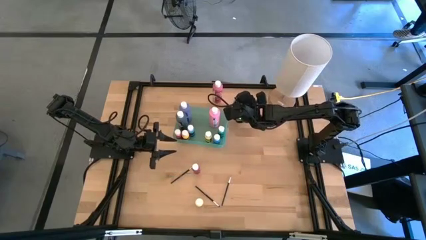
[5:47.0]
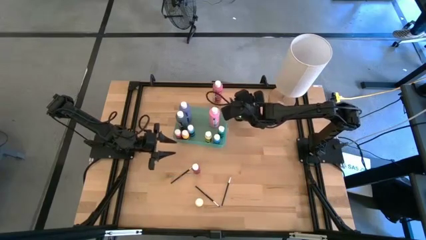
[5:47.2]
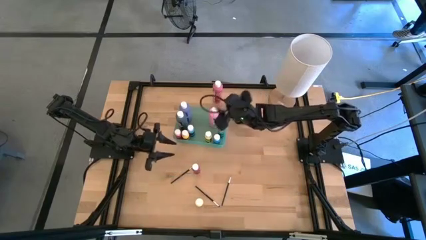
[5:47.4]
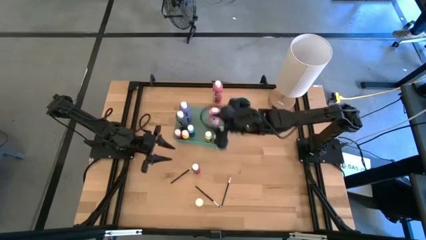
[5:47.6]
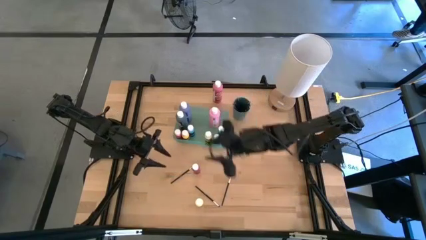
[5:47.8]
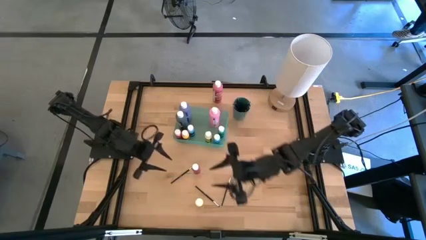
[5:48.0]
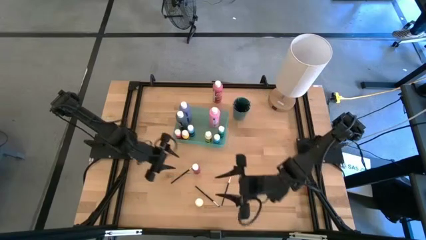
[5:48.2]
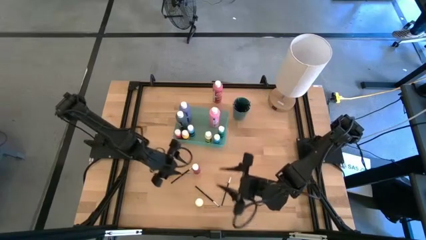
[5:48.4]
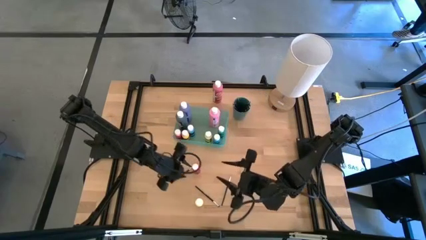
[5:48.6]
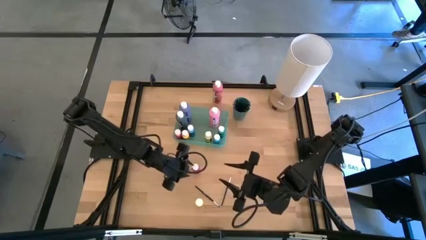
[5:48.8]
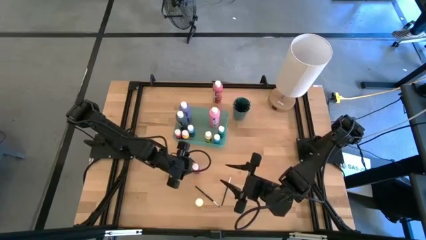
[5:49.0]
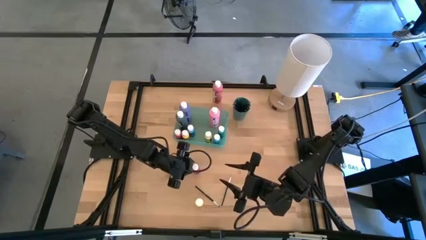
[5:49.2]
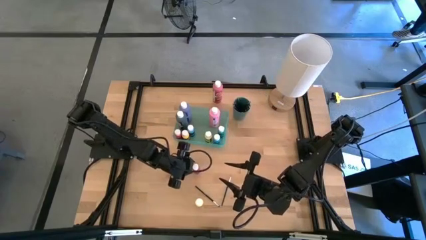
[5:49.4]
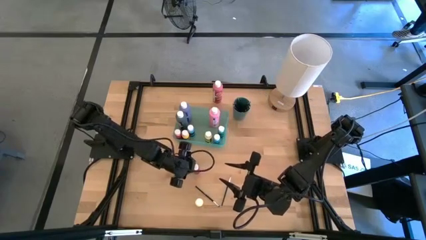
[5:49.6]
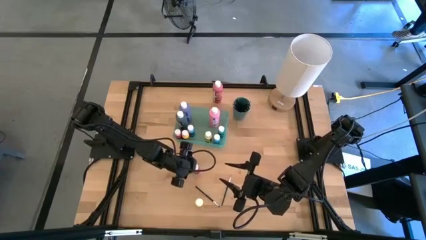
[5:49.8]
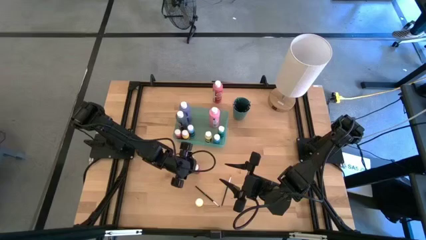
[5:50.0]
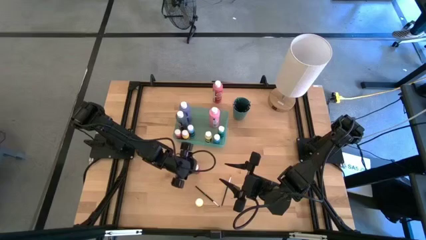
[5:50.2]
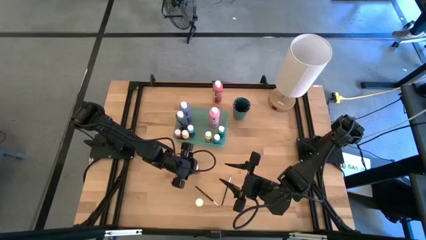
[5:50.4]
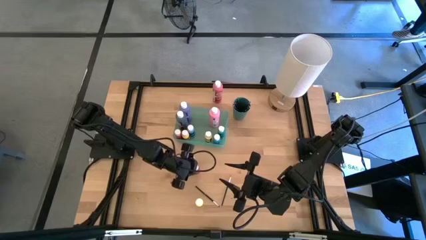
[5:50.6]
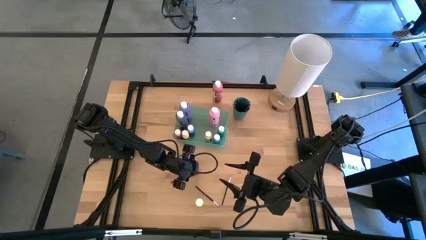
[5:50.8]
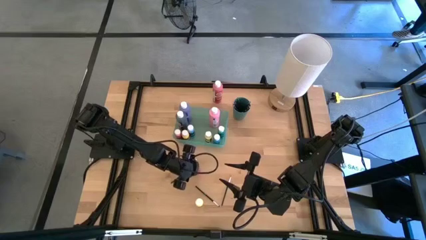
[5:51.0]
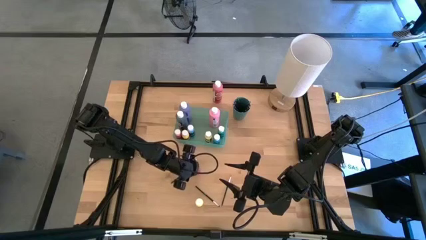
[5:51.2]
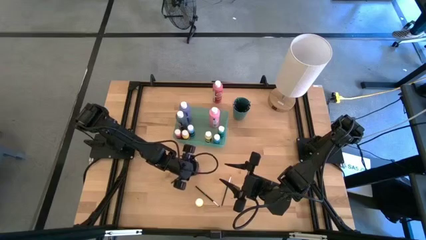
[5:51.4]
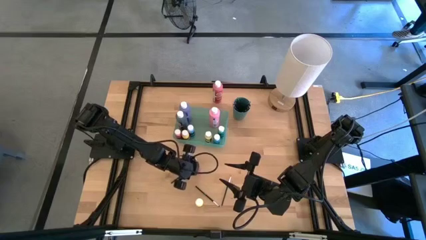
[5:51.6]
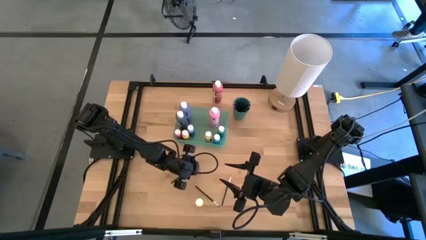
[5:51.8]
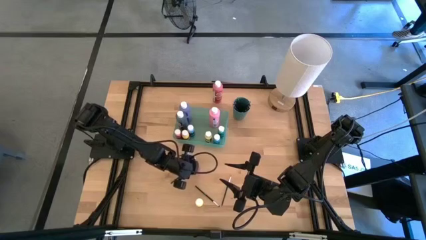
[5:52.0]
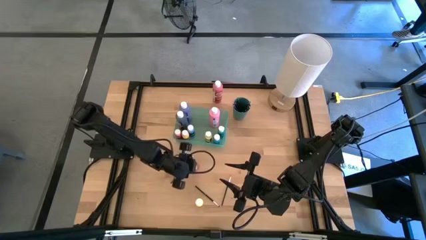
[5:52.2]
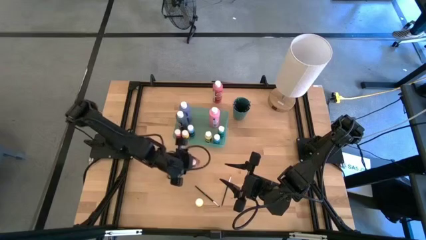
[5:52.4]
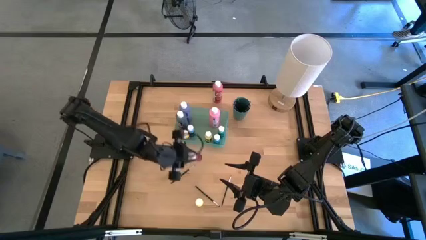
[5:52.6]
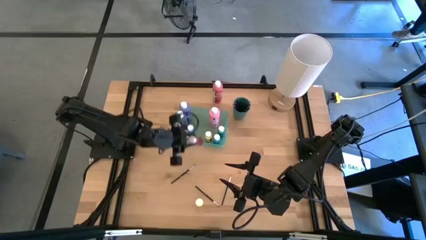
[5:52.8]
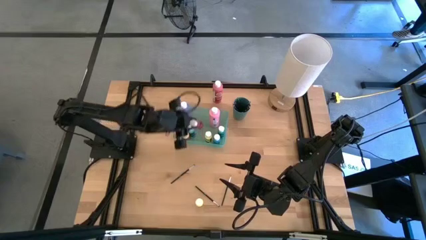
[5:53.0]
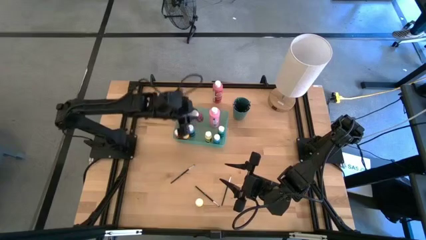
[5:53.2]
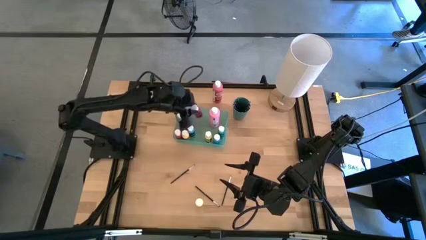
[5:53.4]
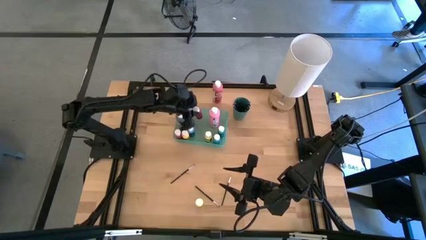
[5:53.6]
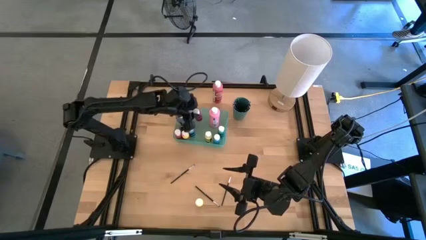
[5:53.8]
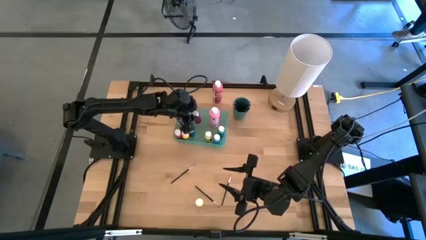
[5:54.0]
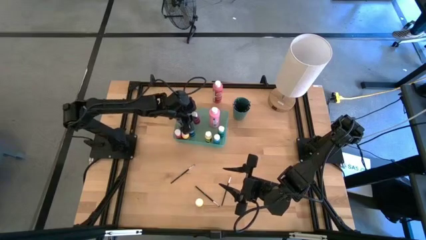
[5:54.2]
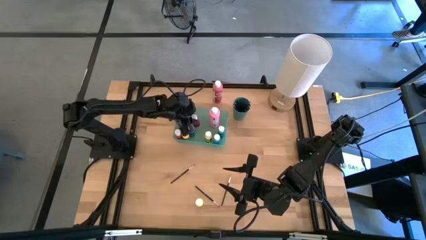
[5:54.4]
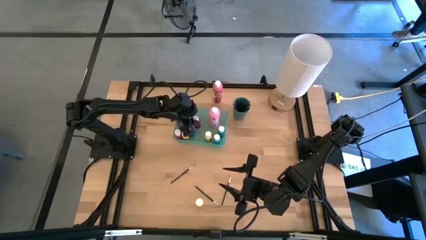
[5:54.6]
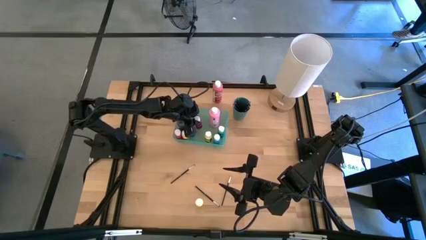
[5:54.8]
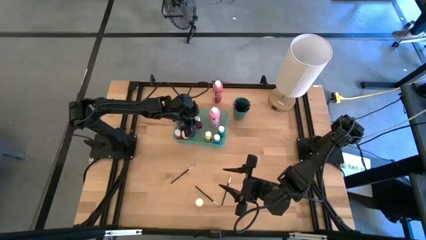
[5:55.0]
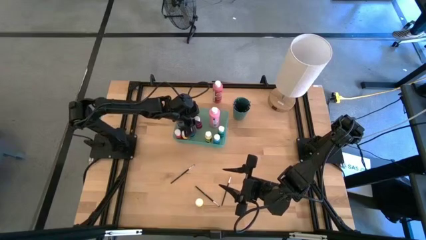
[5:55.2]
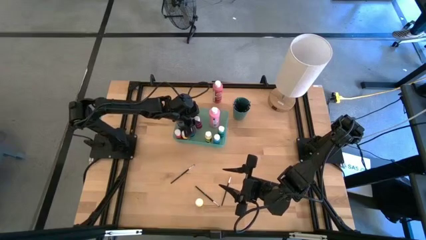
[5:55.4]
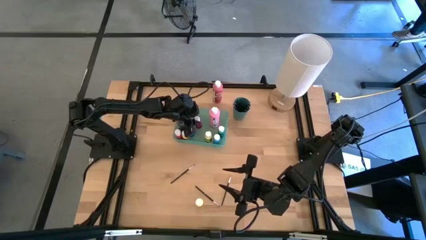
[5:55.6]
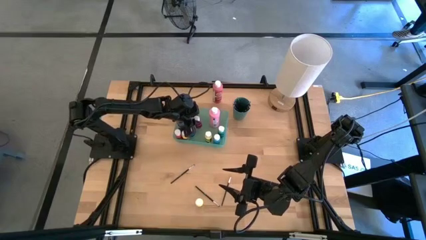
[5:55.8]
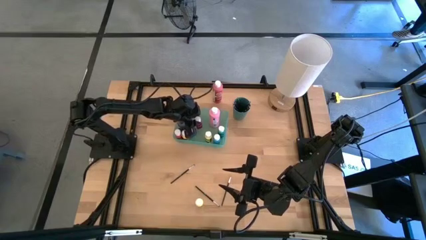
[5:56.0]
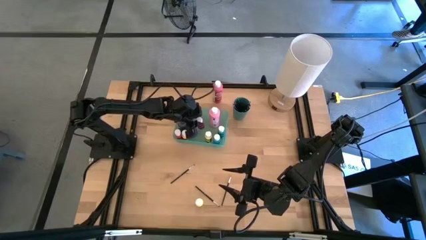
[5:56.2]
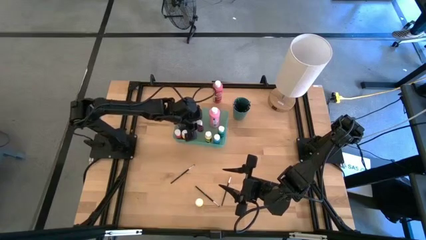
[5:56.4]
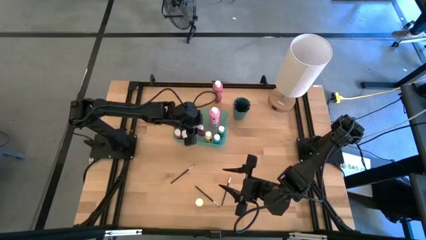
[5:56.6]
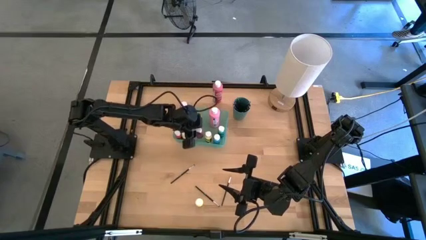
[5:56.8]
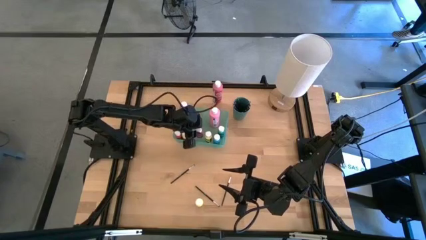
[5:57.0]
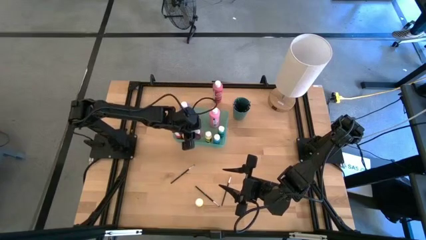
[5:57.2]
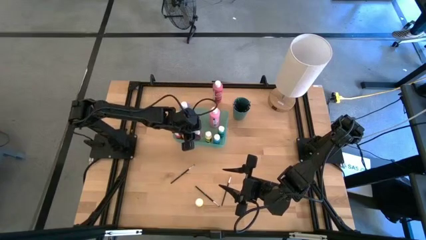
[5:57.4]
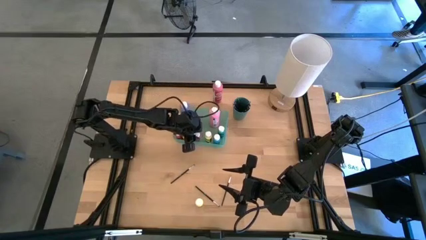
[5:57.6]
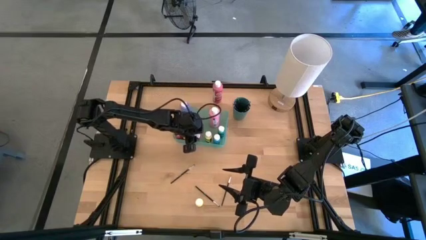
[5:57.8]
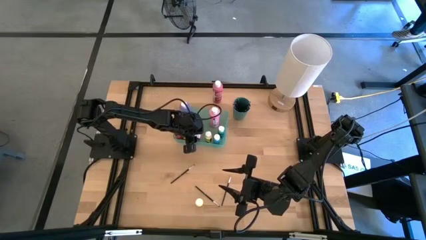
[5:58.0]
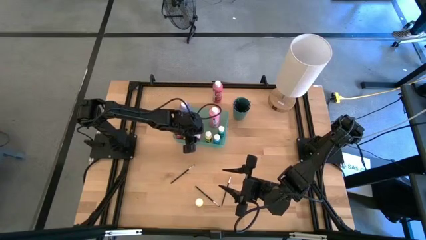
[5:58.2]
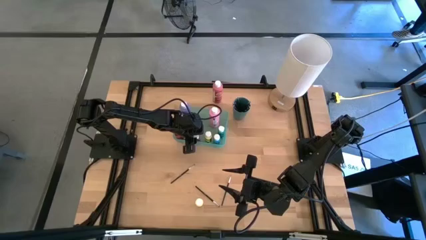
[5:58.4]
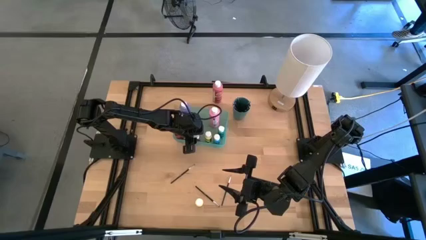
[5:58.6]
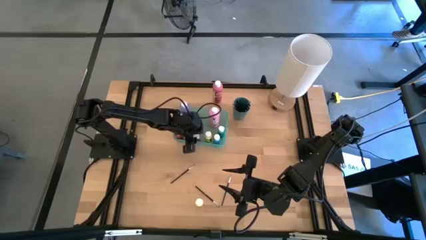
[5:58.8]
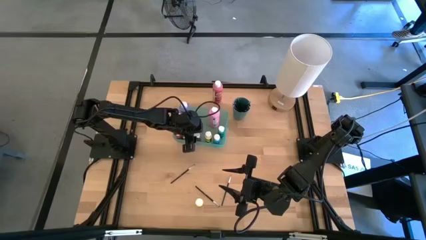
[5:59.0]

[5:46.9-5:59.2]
Task: Pick & Place Paint Supplies
Put the small dark pink bottle into the green bin
